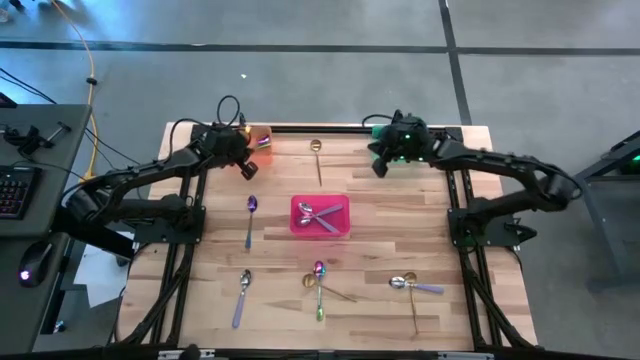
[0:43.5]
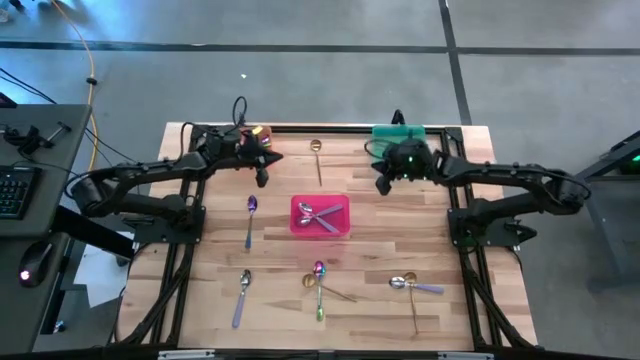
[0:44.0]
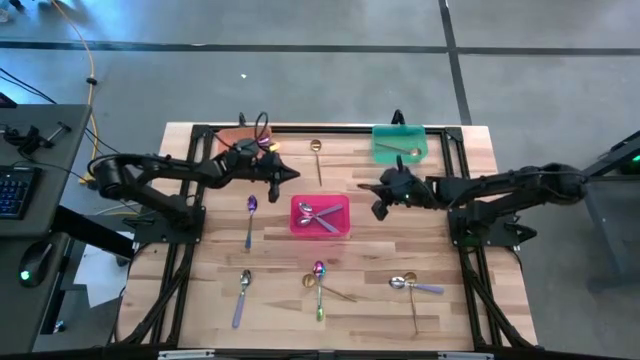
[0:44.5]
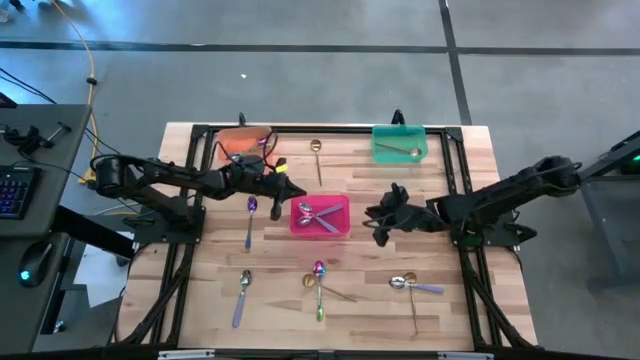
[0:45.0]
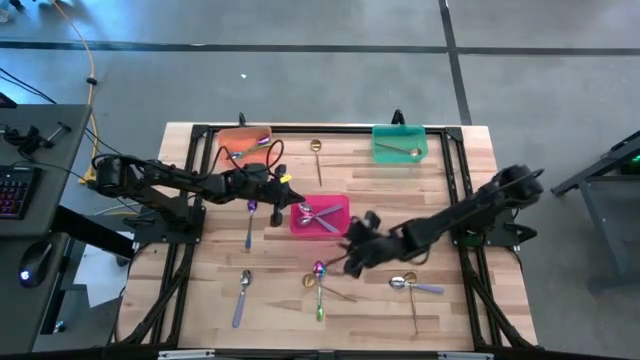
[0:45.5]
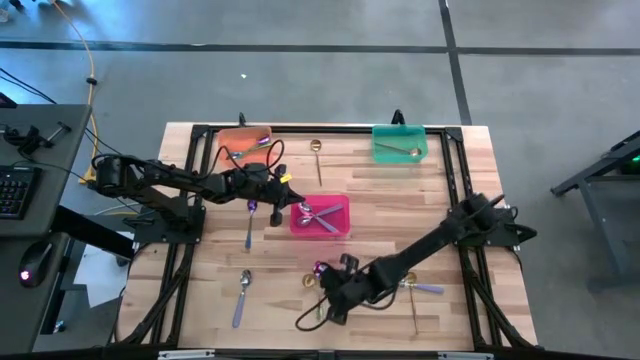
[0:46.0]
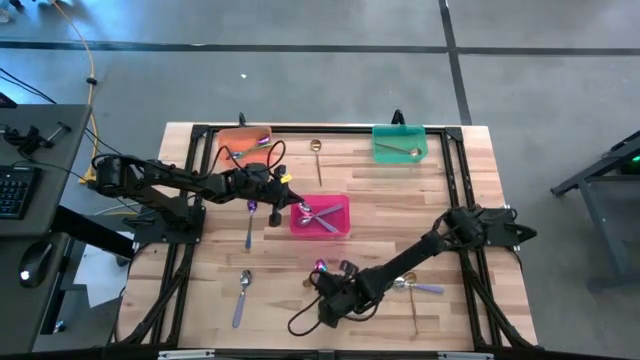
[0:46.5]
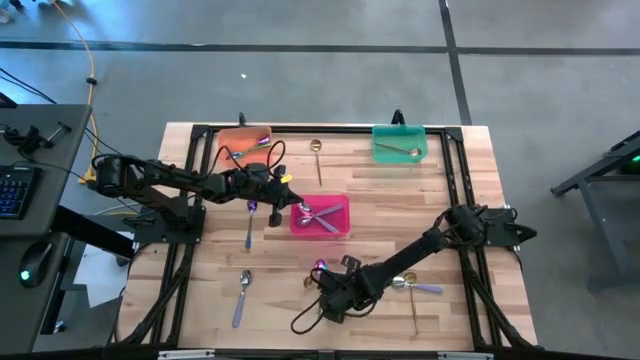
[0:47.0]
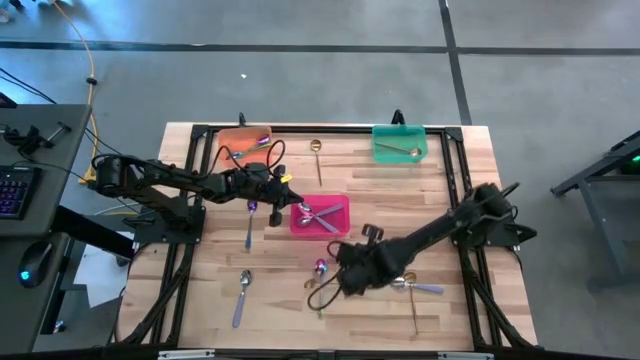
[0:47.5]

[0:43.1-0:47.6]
Task: Sort silverware by color (type)
Put the gold spoon into the green bin

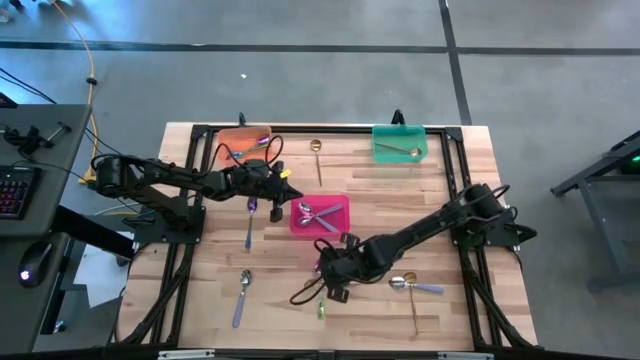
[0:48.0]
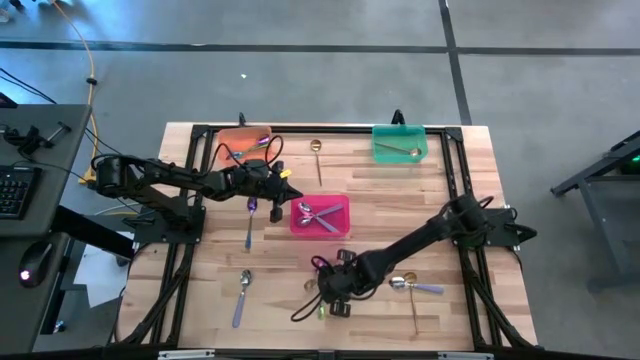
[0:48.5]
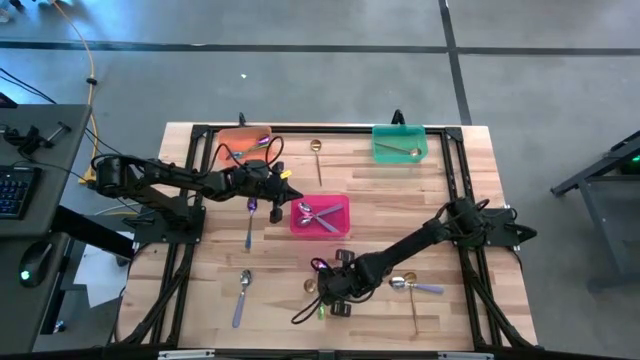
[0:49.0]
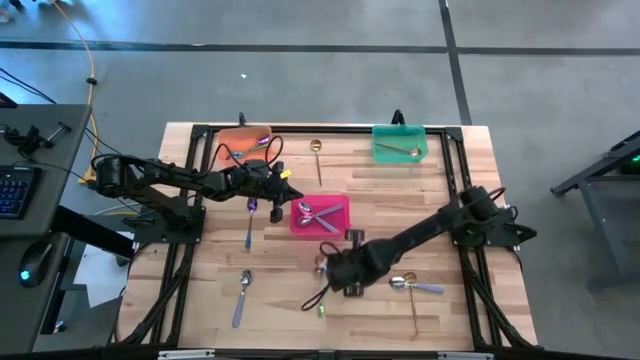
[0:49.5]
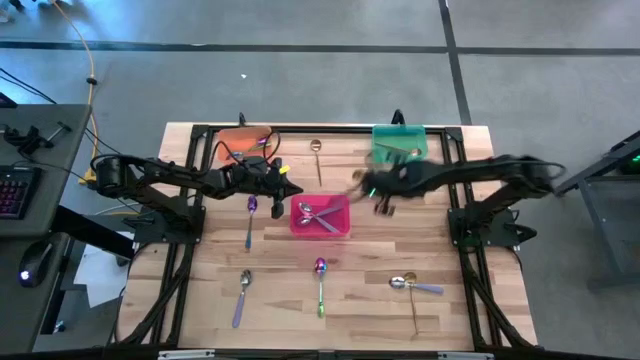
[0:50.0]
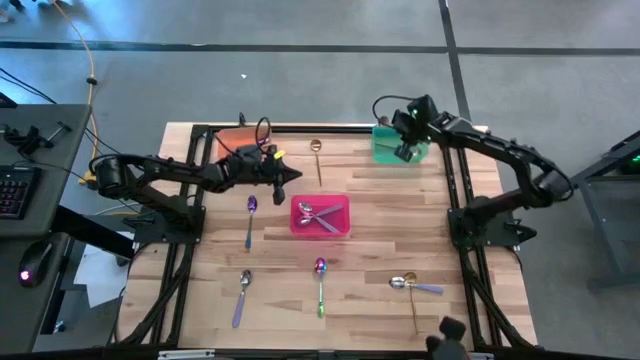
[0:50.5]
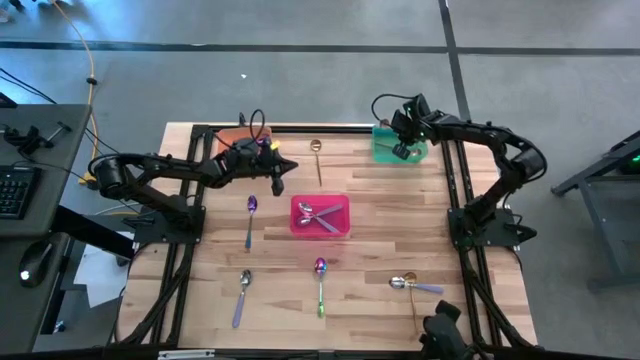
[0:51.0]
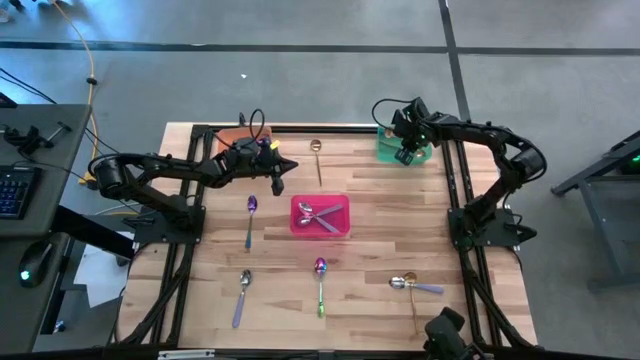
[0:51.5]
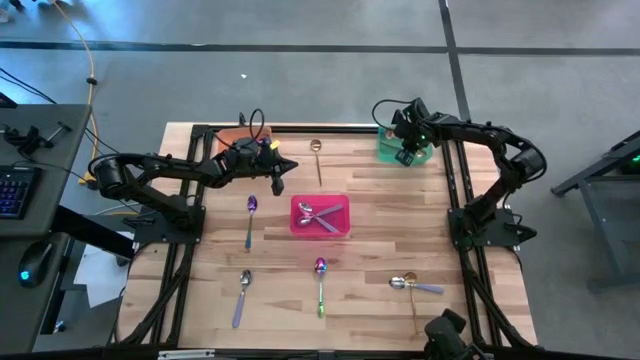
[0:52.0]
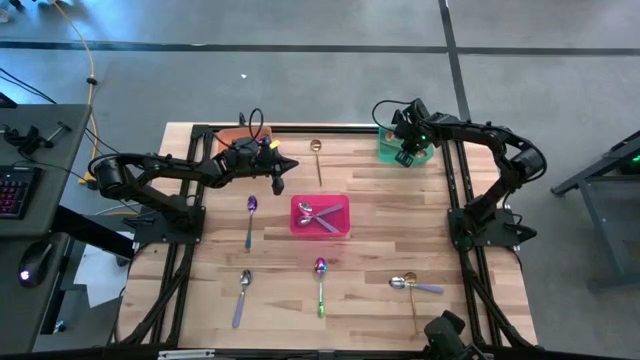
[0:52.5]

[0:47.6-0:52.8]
Put the gold spoon into the green bin

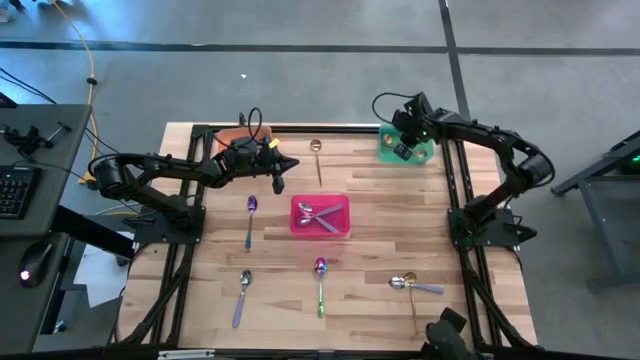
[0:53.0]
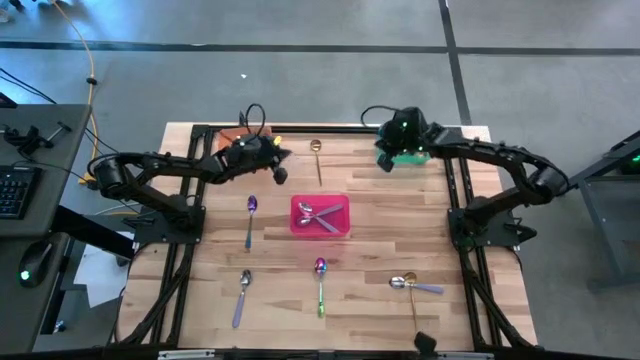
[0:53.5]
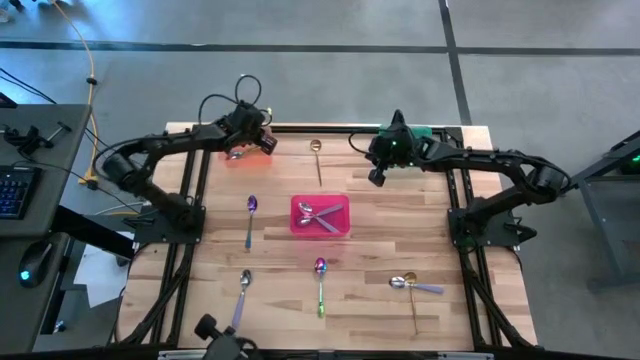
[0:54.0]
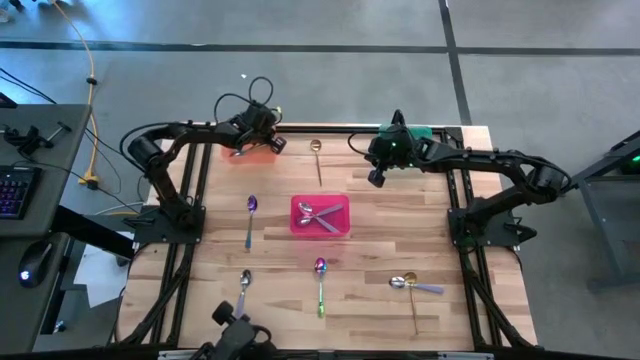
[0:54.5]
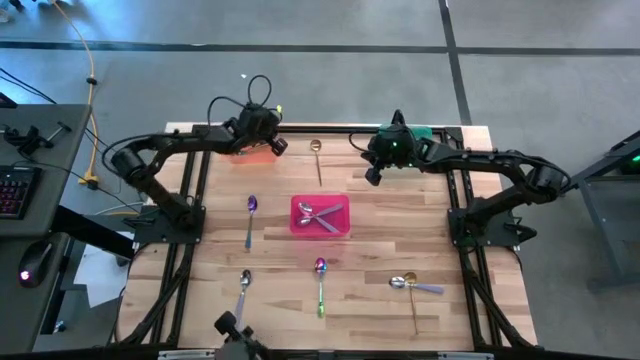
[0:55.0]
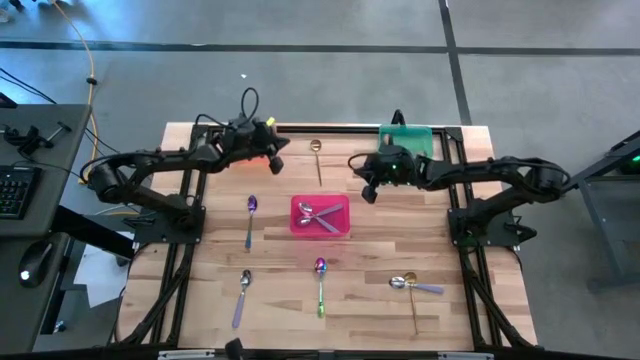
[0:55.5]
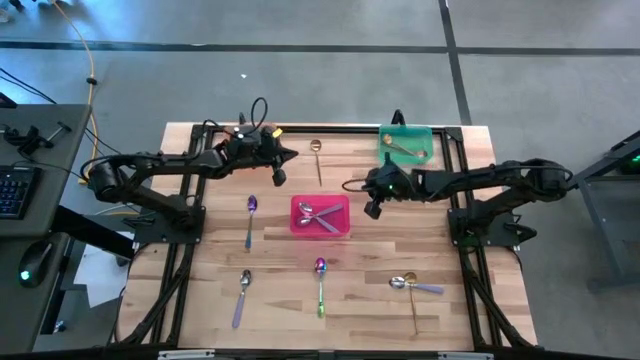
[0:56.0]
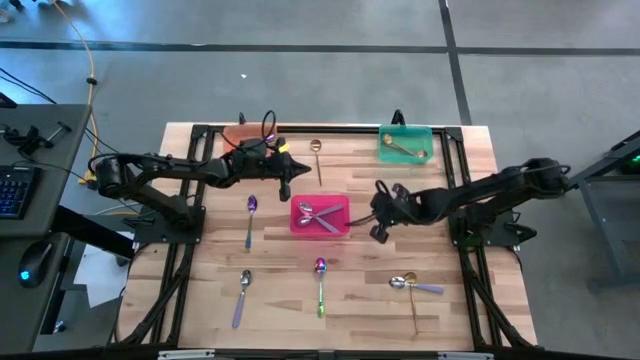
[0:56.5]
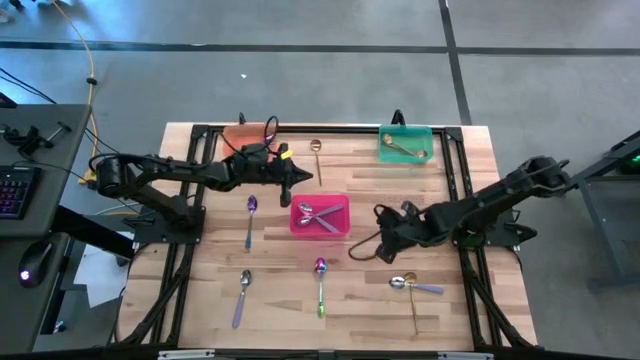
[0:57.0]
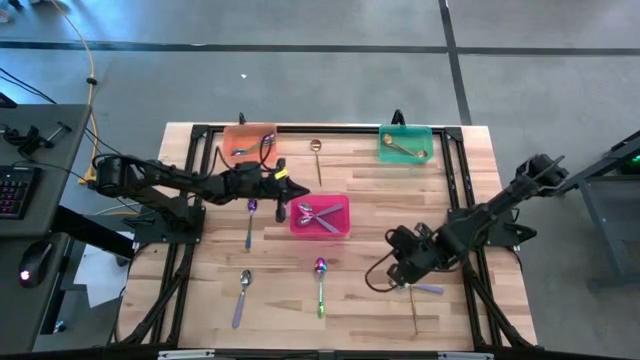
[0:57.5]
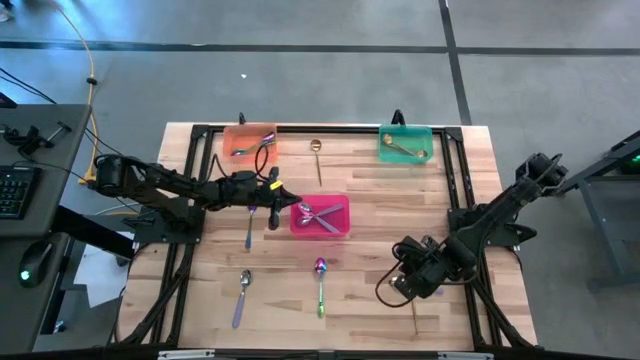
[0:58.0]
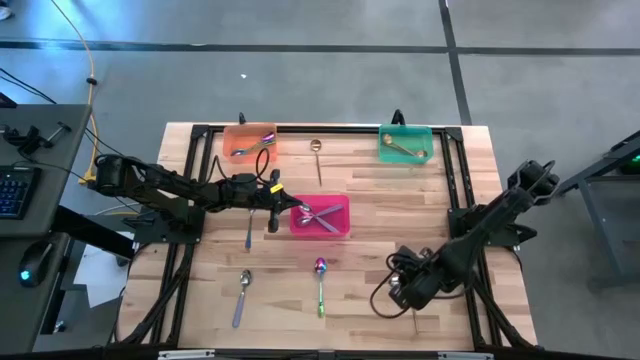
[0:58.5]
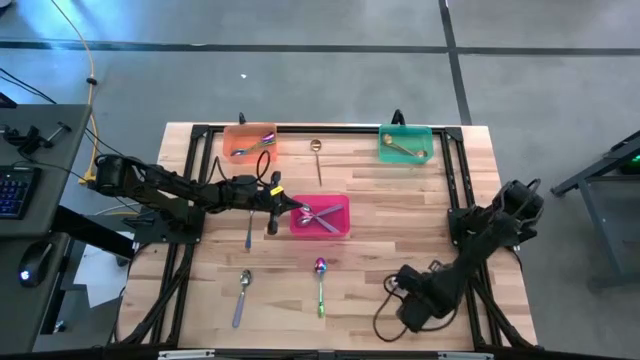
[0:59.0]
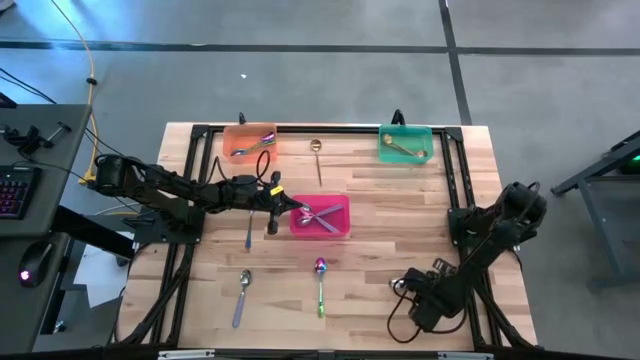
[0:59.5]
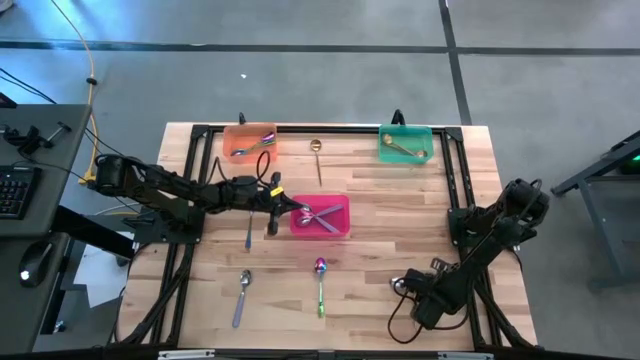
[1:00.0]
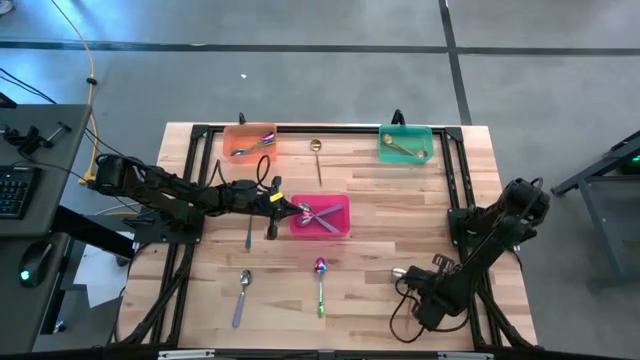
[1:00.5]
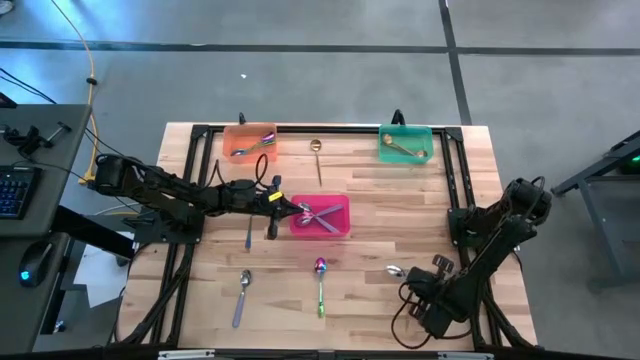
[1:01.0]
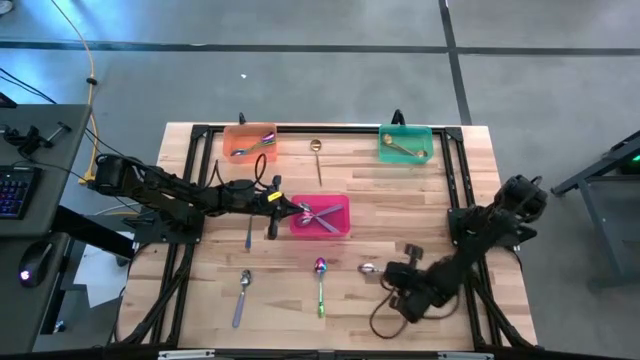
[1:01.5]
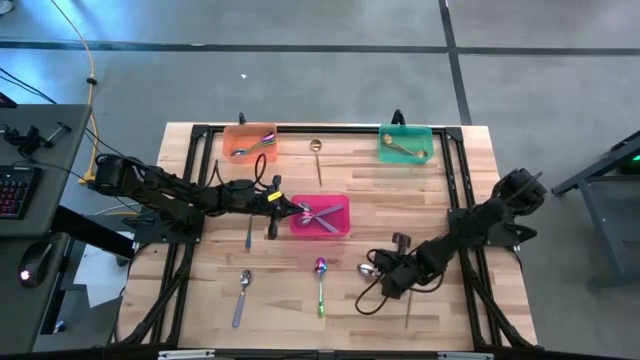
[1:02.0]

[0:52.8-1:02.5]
Put the purple spoon into the red bin

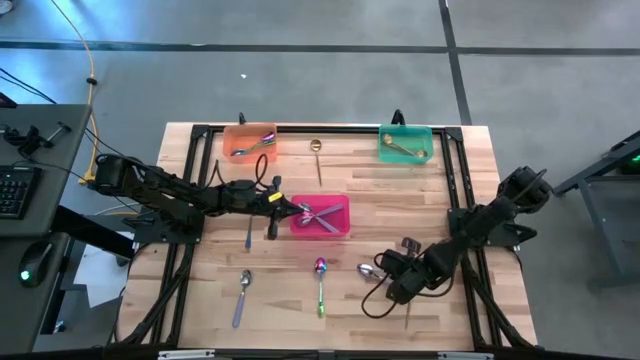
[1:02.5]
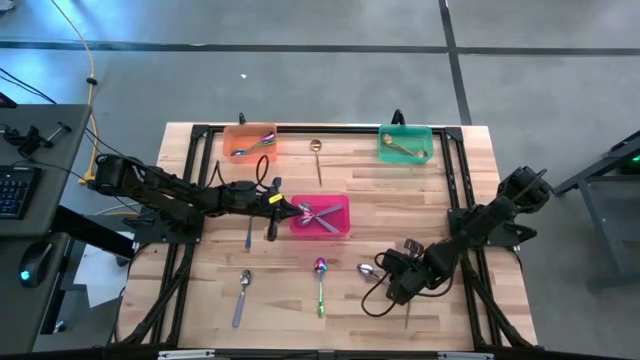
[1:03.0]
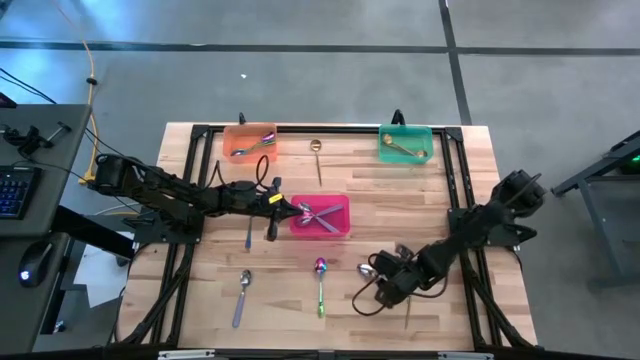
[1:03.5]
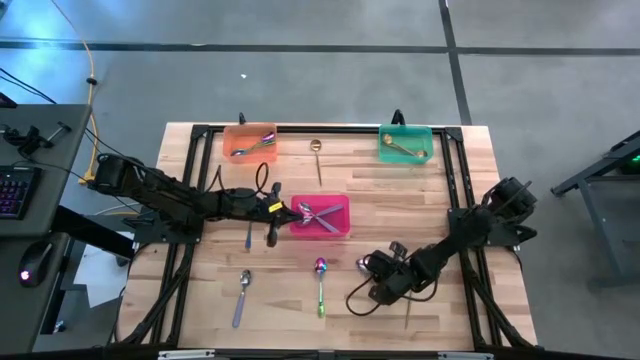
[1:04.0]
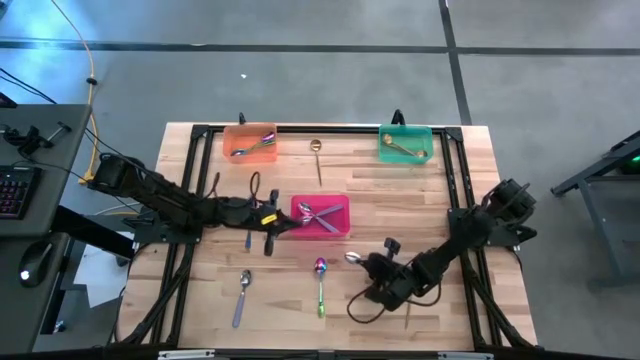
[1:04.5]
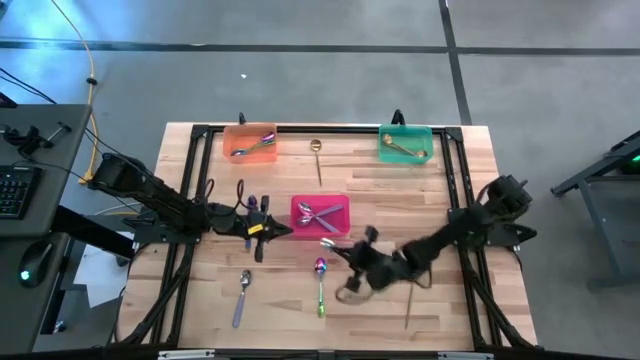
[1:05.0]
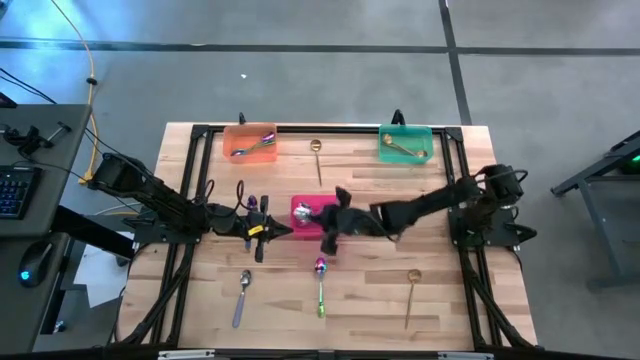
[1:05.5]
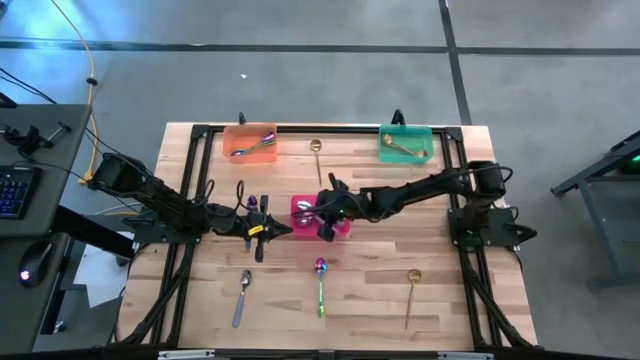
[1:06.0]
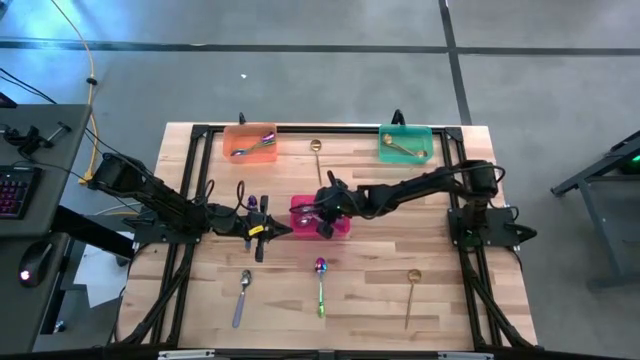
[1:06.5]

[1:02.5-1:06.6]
Put the purple spoon into the red bin
